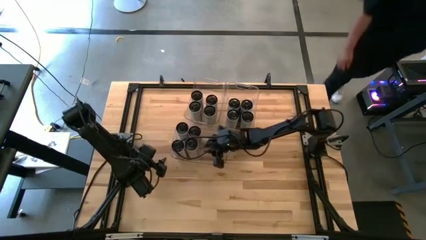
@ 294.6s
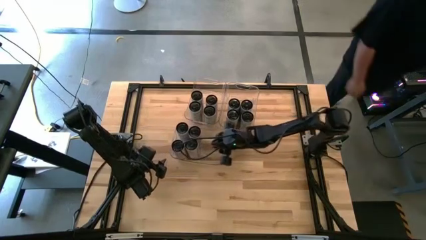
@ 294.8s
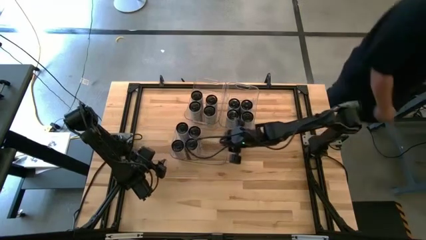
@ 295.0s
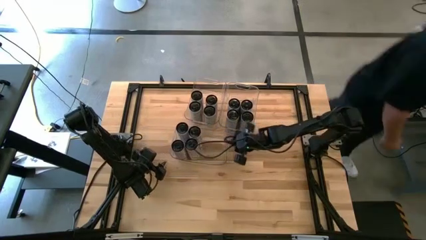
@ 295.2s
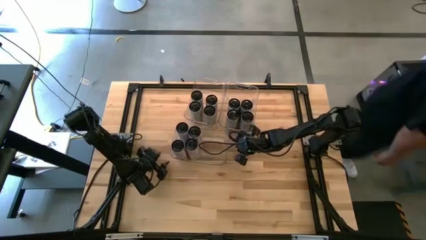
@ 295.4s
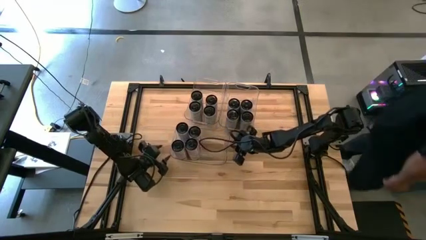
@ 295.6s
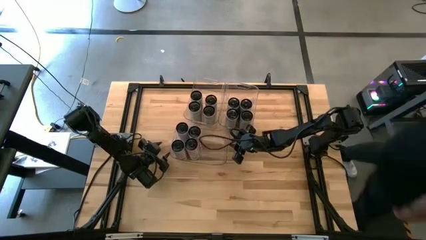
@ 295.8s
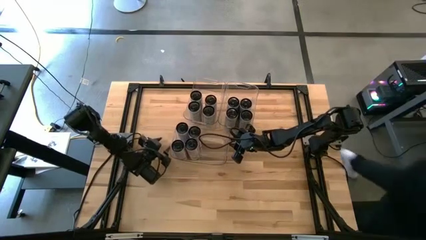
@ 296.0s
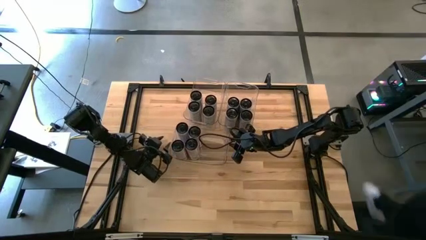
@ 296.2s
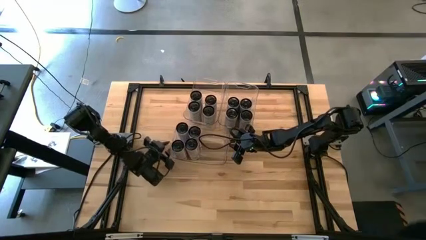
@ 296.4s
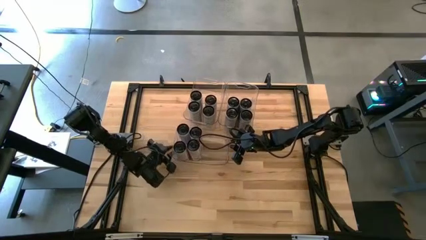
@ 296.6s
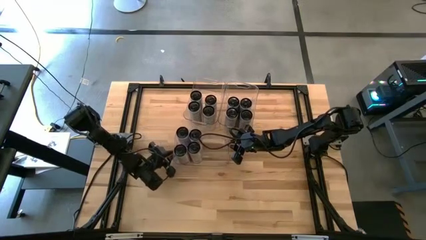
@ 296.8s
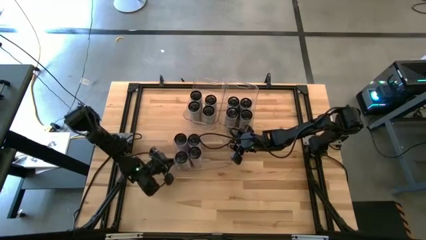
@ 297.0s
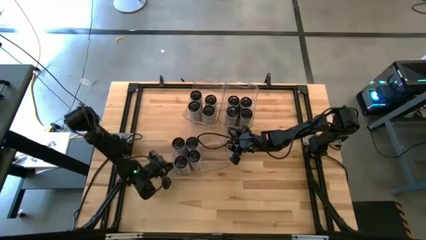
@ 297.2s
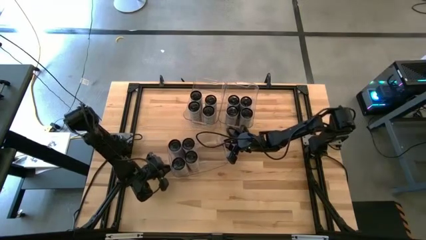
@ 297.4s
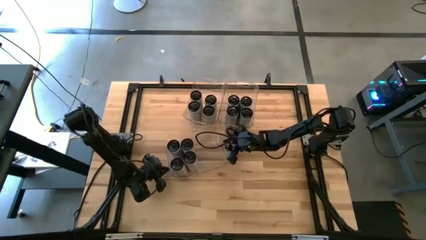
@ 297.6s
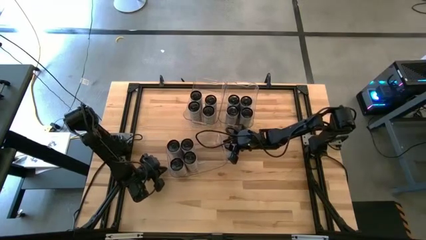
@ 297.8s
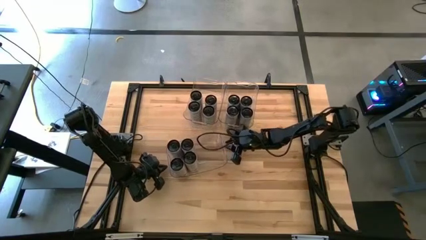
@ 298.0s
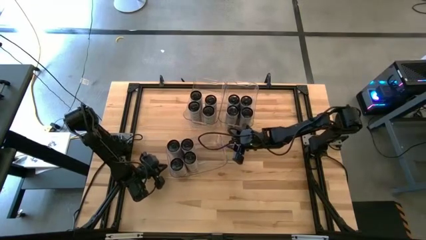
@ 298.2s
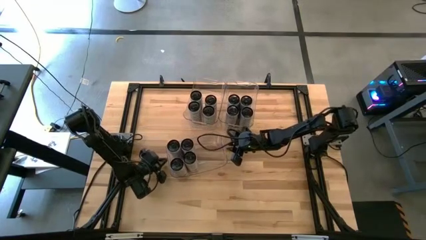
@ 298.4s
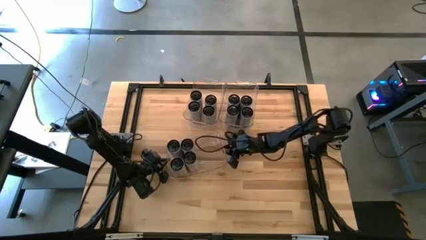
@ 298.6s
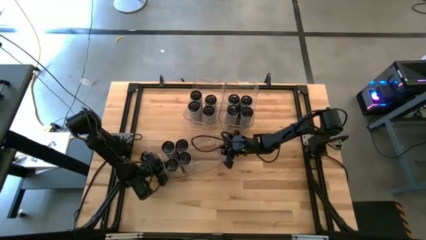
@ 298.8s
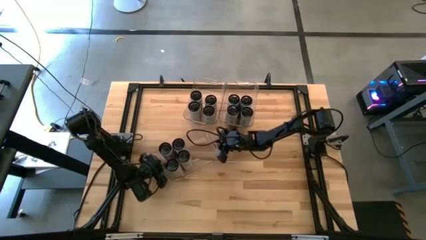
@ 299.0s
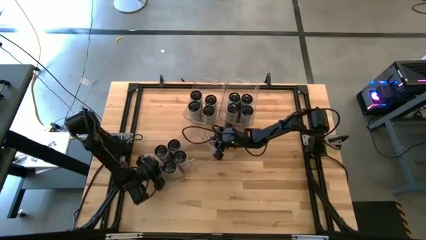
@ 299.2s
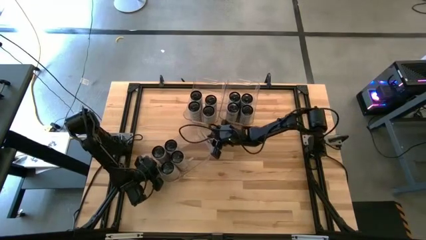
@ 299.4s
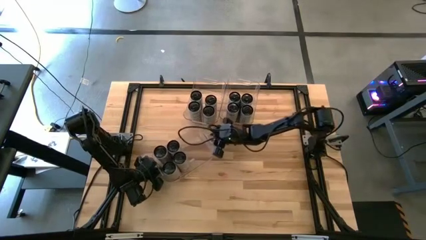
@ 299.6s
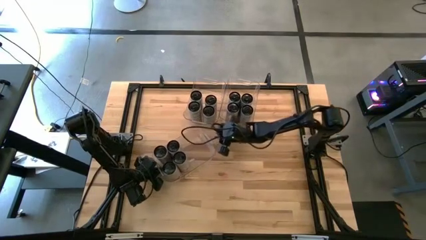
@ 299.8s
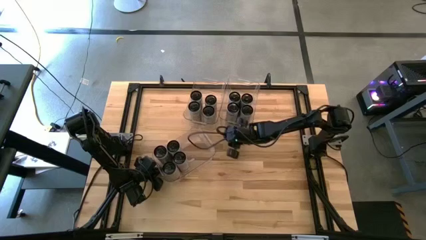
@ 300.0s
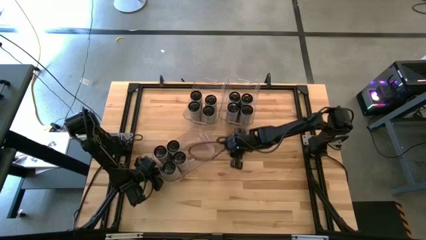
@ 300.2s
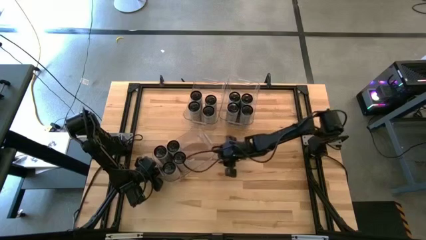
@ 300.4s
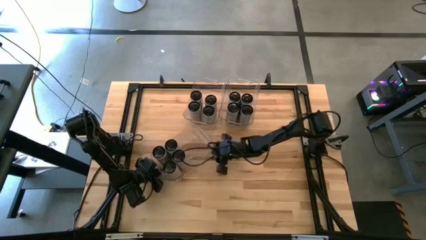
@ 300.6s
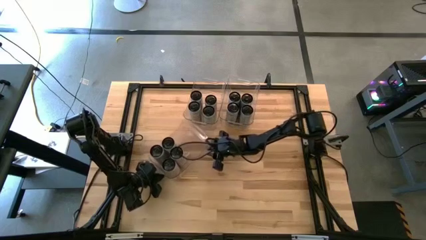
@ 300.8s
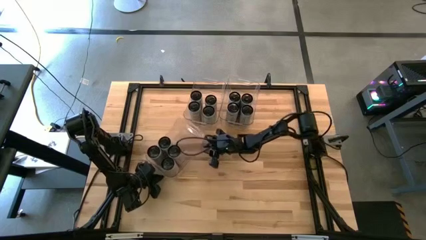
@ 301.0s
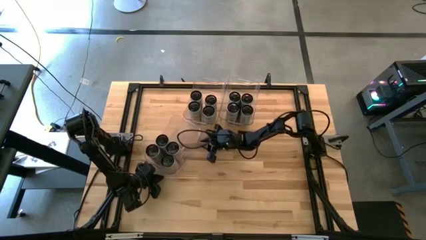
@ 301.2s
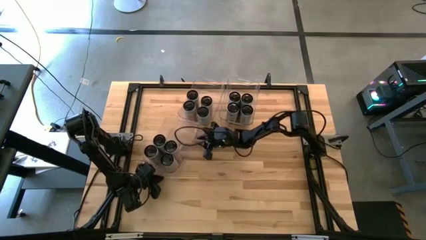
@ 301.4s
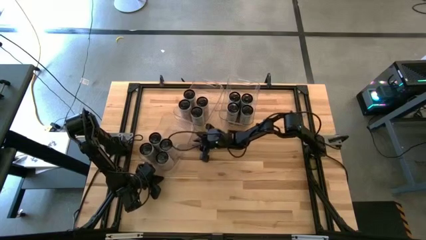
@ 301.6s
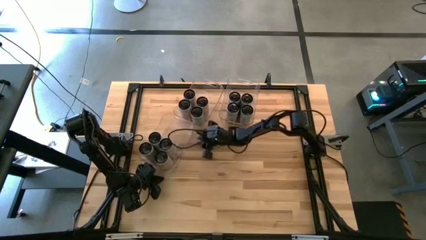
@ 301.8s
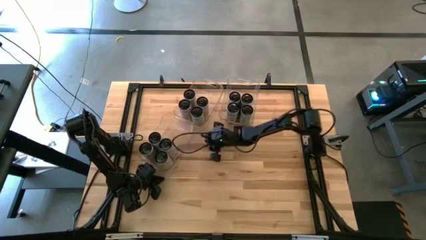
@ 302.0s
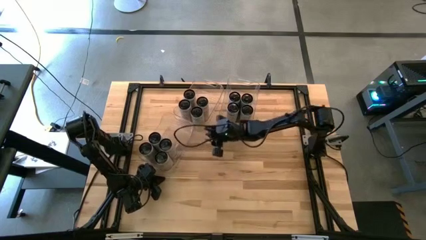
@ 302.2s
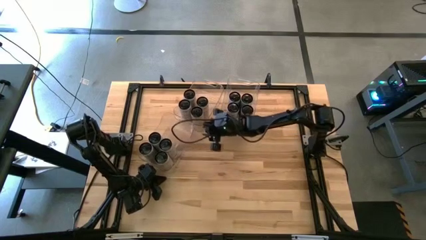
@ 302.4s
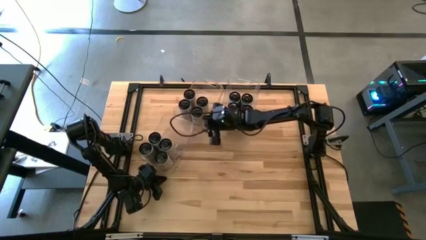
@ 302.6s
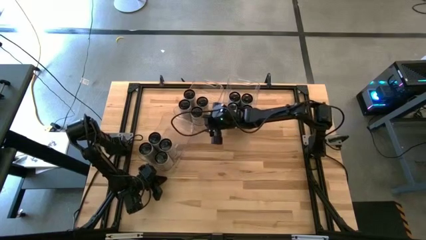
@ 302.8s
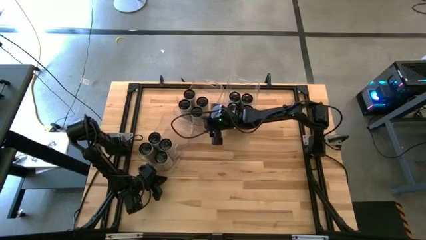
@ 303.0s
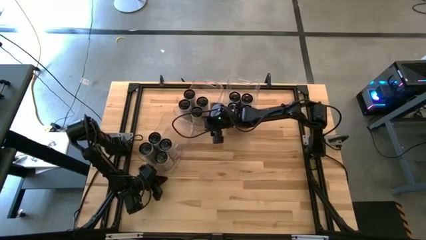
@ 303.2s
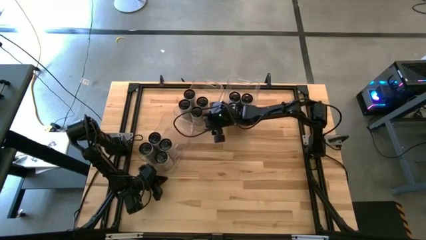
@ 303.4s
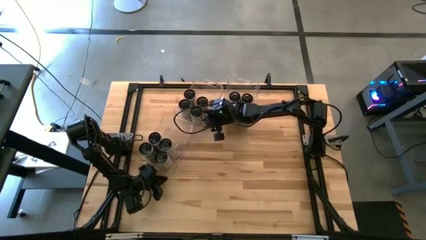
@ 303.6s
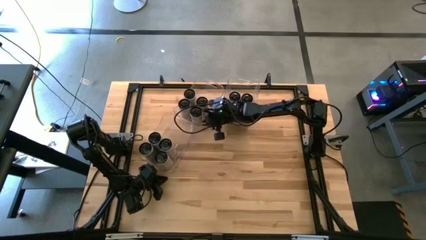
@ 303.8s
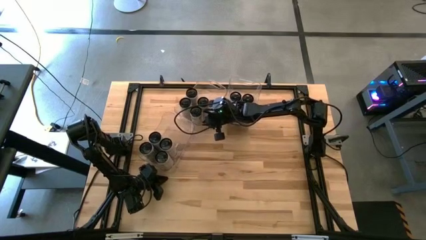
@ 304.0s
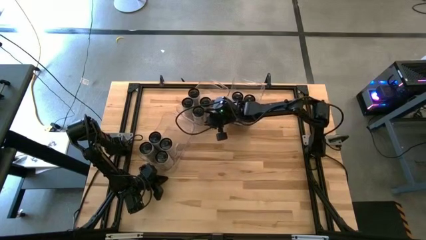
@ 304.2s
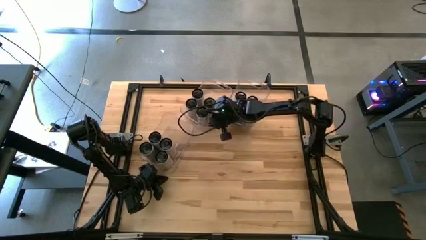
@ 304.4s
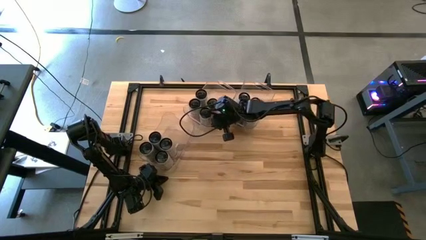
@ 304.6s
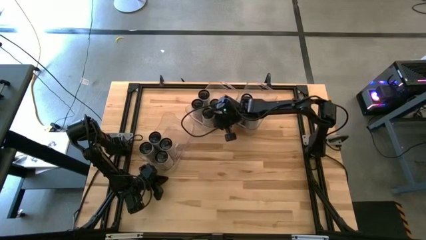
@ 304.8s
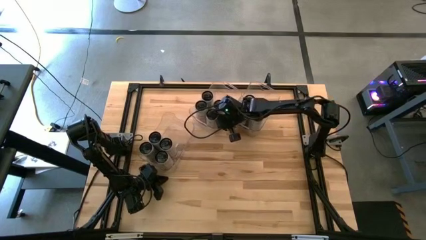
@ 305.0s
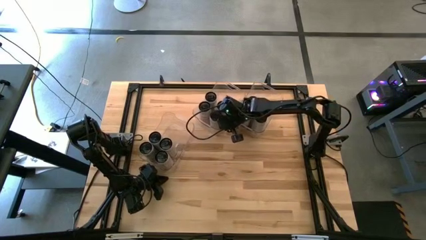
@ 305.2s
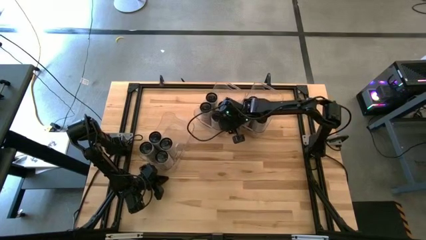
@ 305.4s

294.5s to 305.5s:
Task: Sort soda cans
Move the bottom transparent bin to the top left of the table

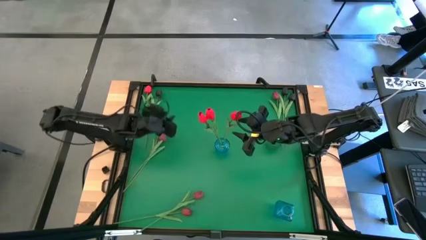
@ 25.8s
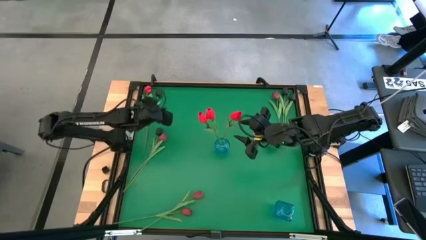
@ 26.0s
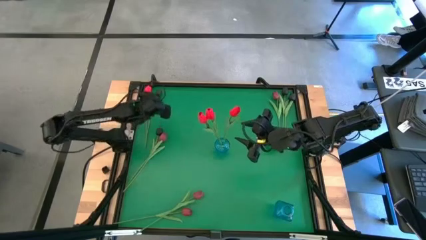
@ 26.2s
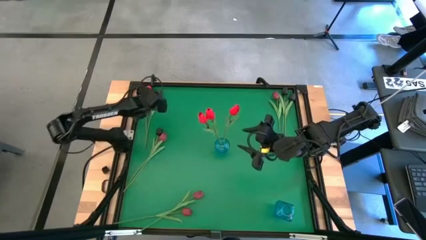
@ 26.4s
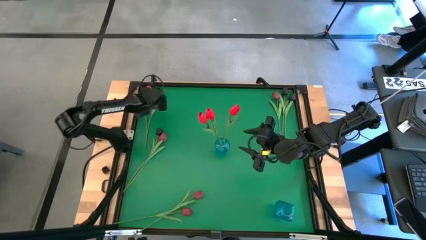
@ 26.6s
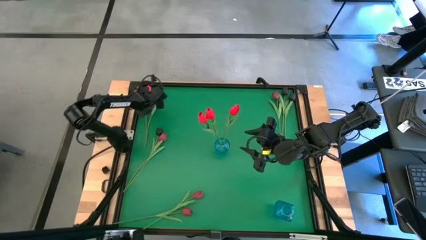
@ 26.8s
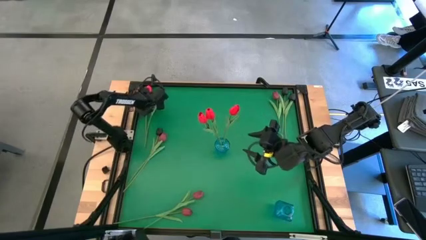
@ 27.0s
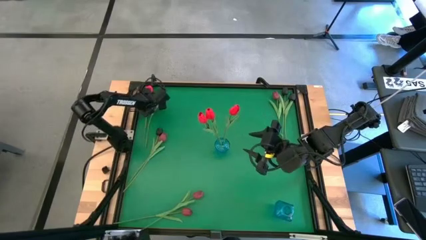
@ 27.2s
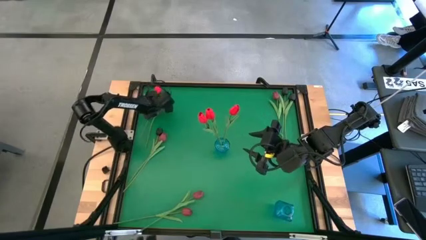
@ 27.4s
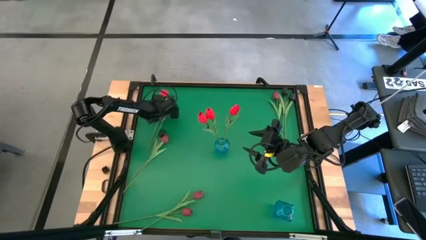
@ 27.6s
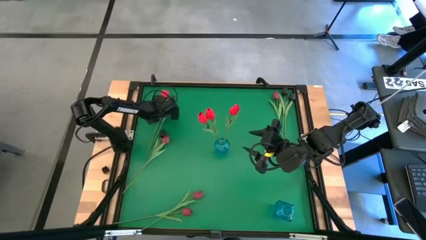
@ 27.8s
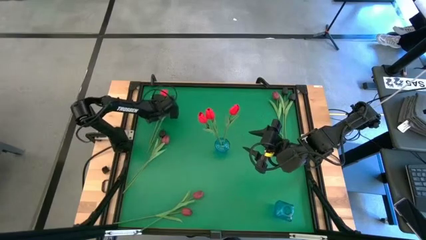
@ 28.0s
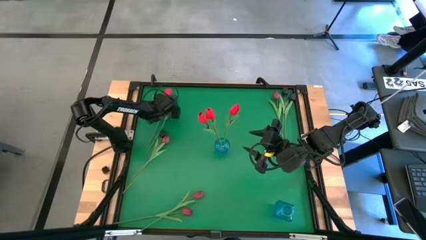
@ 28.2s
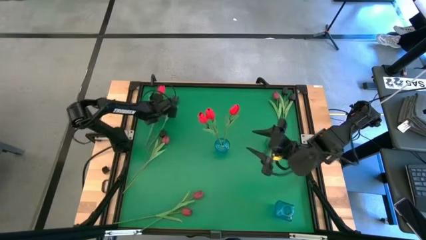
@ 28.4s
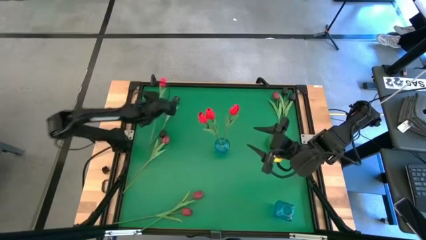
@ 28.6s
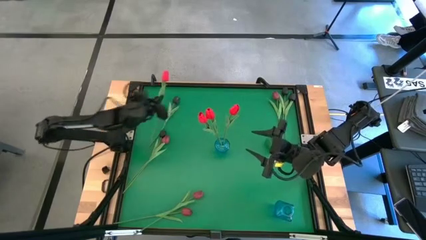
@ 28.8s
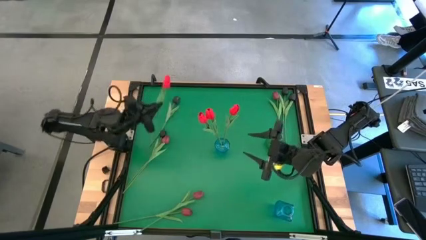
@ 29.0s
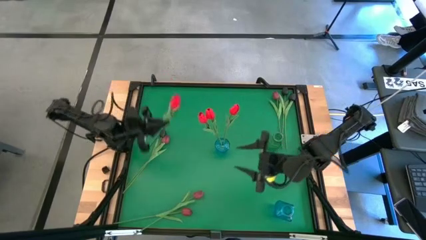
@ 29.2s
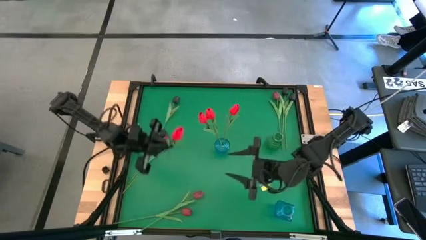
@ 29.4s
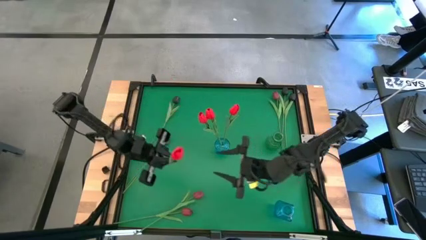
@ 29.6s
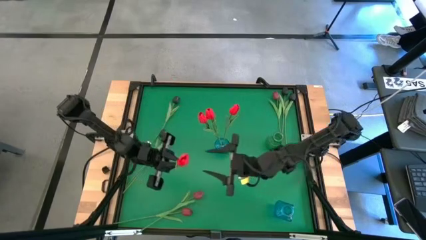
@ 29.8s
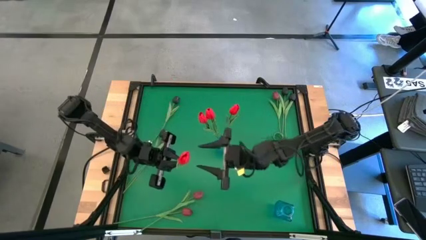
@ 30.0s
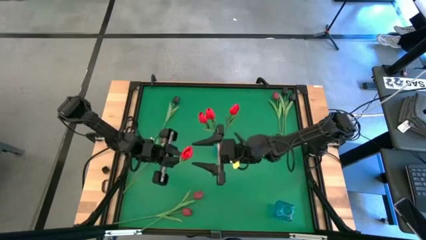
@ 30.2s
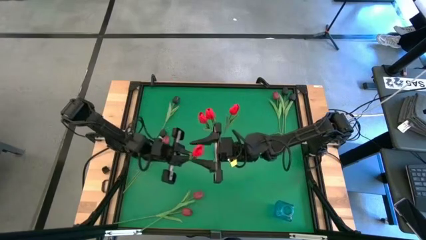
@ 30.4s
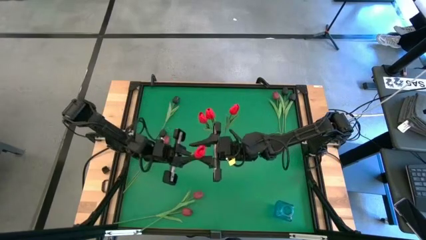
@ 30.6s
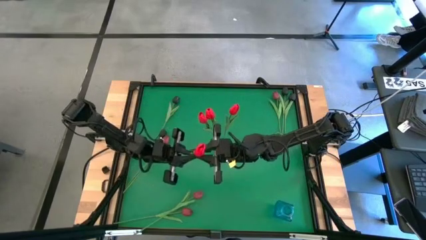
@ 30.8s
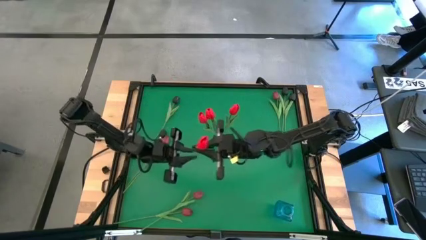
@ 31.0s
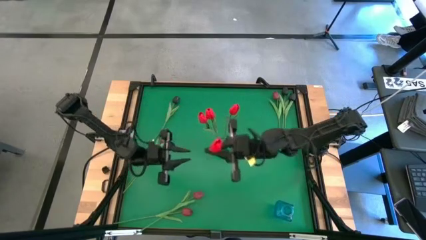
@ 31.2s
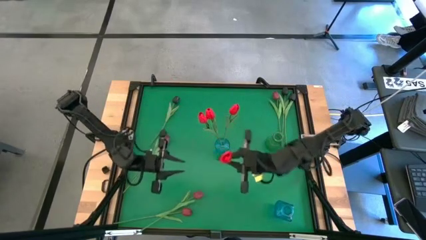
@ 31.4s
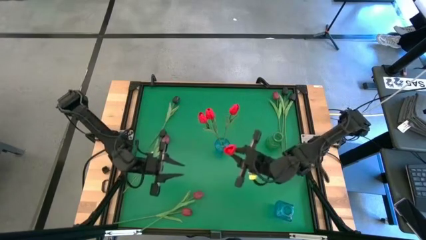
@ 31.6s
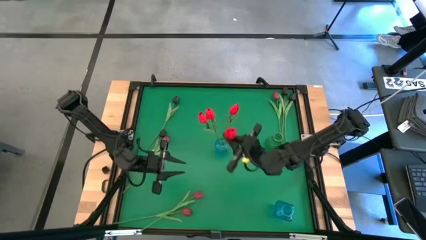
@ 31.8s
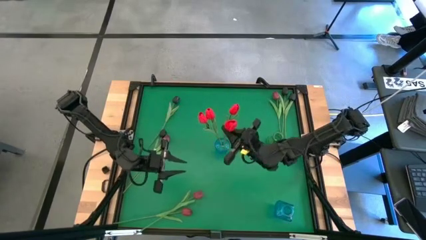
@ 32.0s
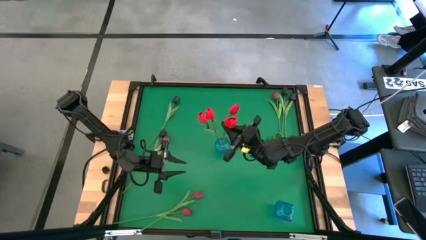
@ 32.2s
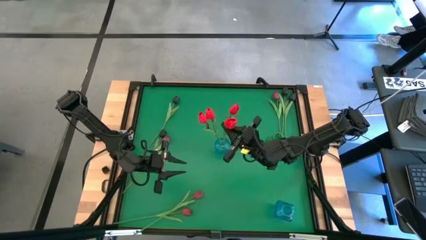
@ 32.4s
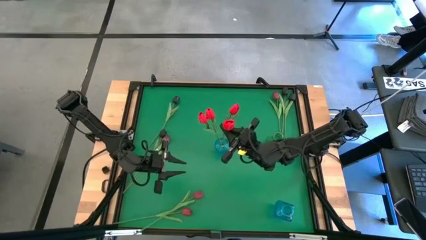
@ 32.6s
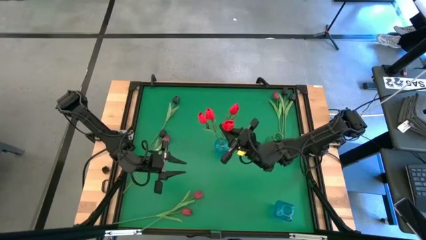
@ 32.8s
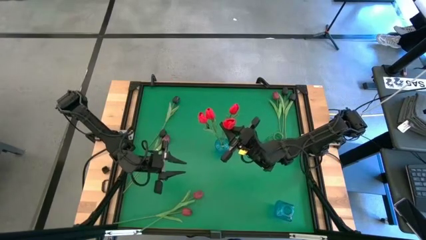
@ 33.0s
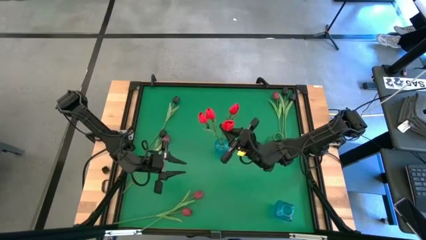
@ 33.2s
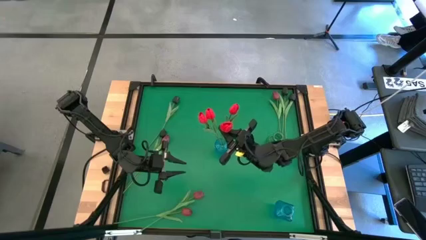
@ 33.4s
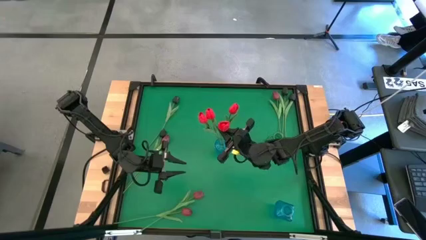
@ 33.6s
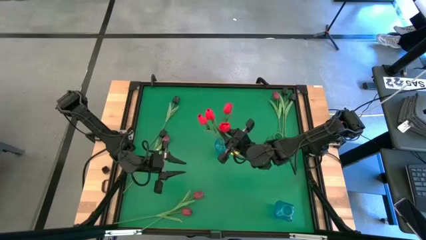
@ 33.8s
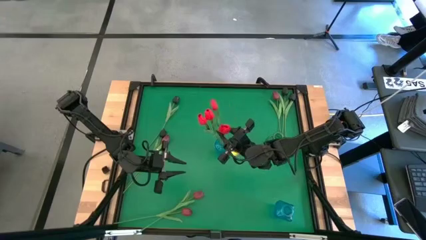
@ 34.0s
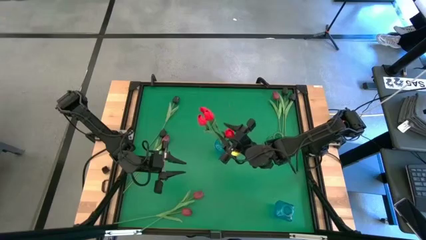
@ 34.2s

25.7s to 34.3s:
Task: Sort flowers into vase by color
Put the red flower in the top blue vase
